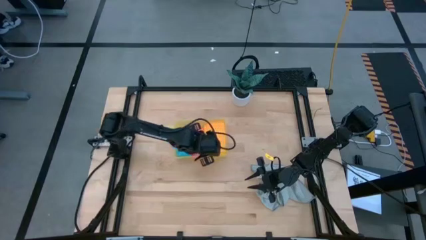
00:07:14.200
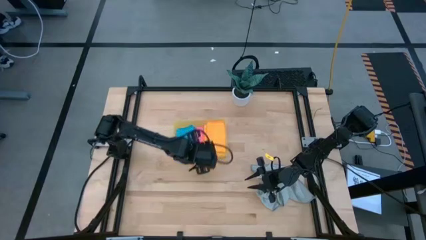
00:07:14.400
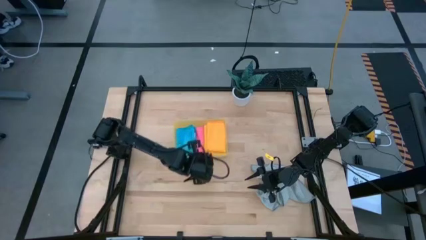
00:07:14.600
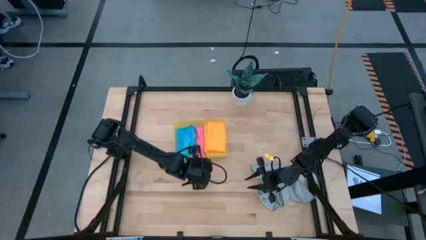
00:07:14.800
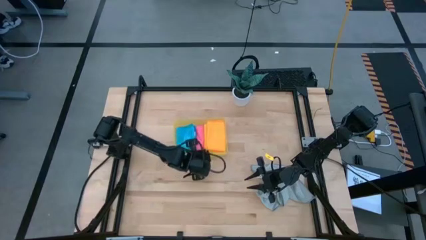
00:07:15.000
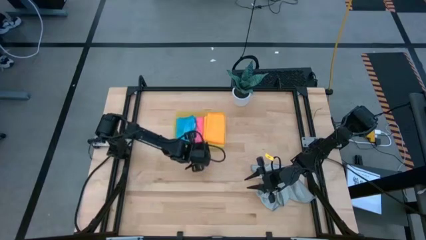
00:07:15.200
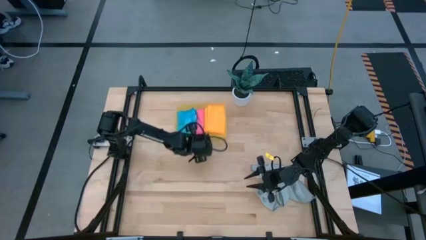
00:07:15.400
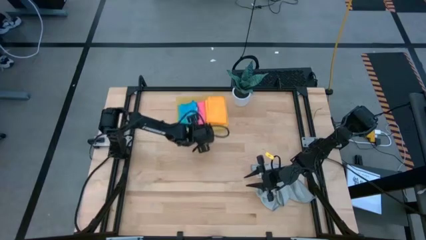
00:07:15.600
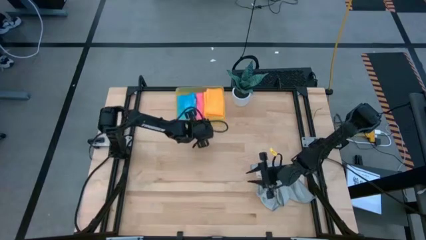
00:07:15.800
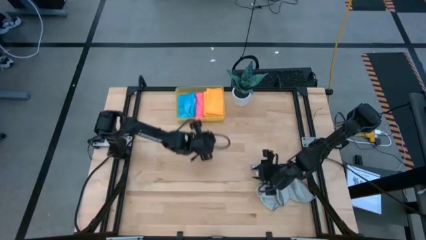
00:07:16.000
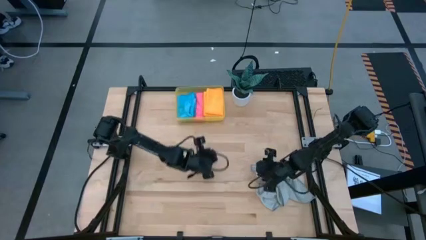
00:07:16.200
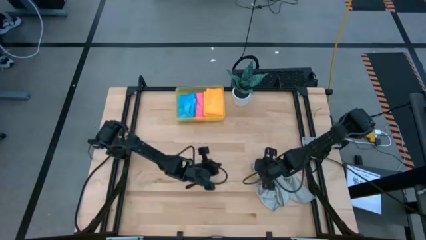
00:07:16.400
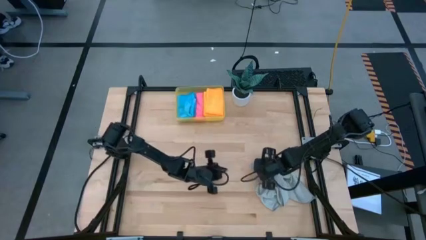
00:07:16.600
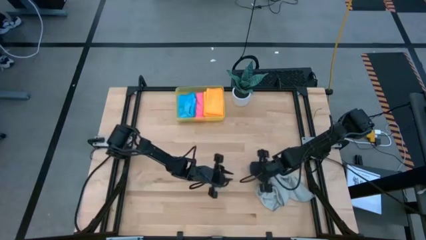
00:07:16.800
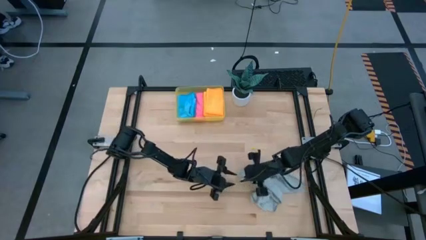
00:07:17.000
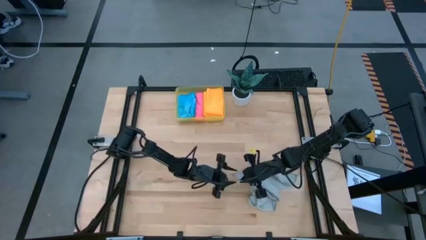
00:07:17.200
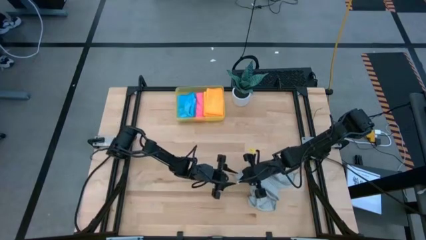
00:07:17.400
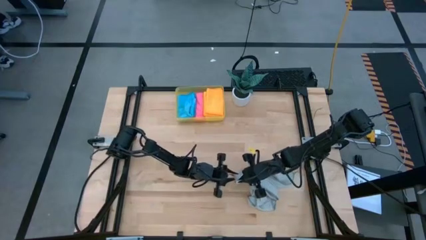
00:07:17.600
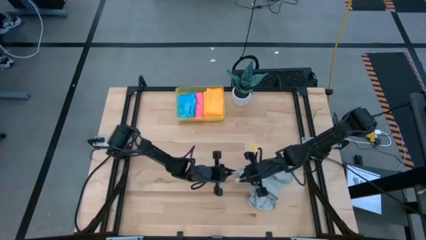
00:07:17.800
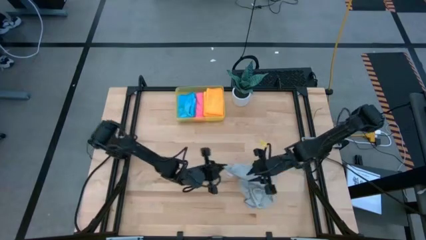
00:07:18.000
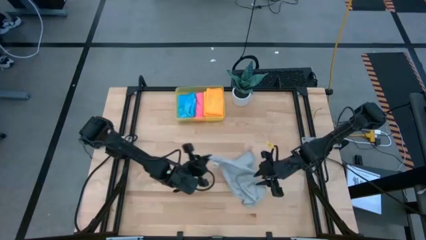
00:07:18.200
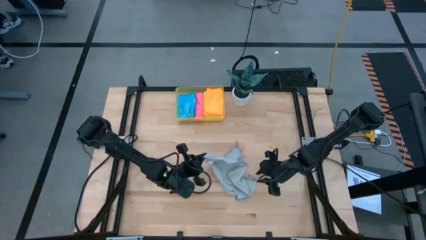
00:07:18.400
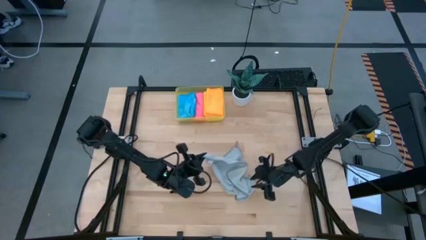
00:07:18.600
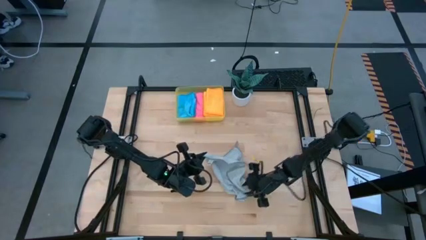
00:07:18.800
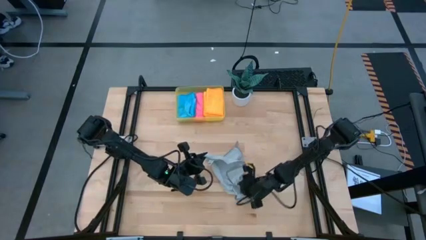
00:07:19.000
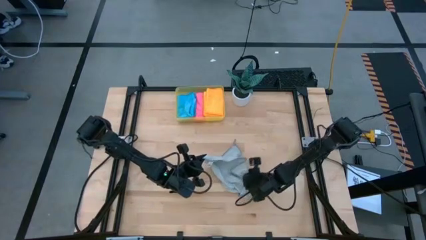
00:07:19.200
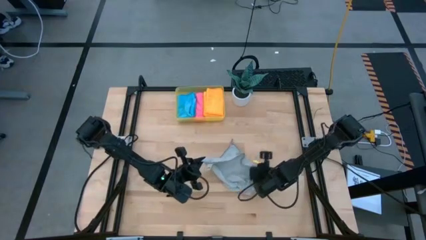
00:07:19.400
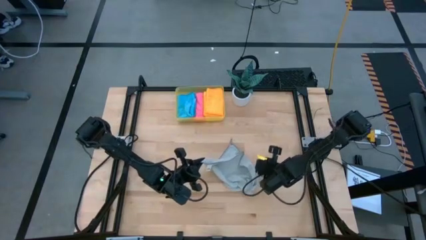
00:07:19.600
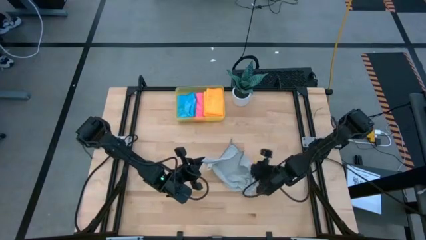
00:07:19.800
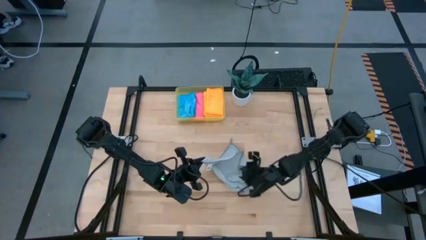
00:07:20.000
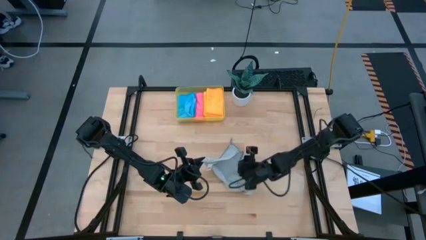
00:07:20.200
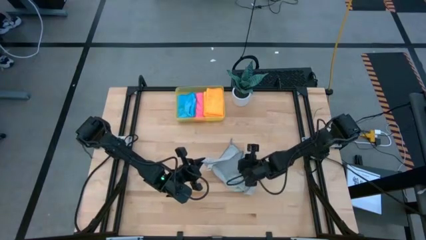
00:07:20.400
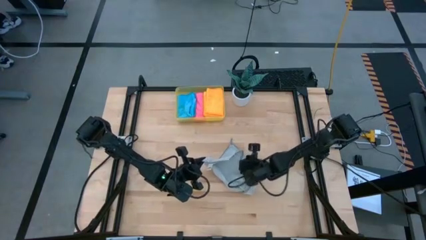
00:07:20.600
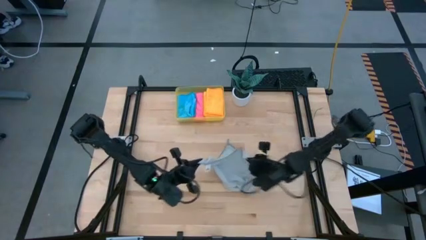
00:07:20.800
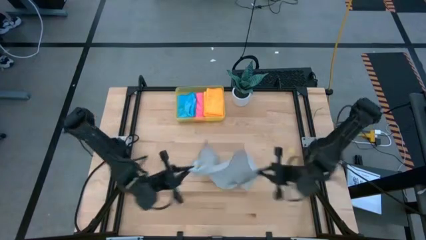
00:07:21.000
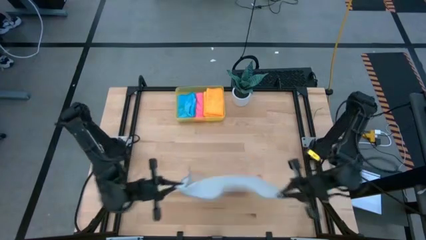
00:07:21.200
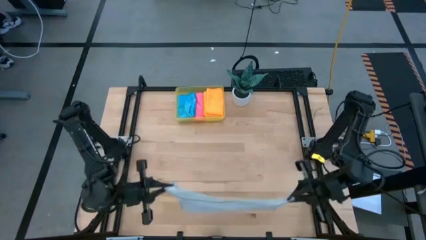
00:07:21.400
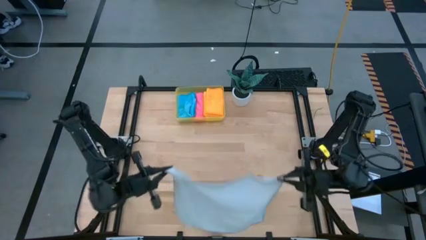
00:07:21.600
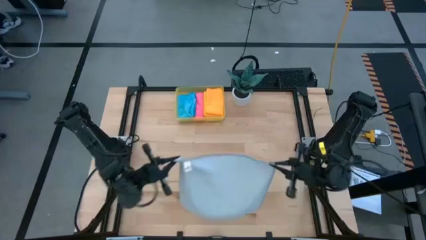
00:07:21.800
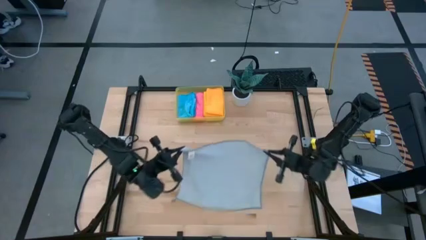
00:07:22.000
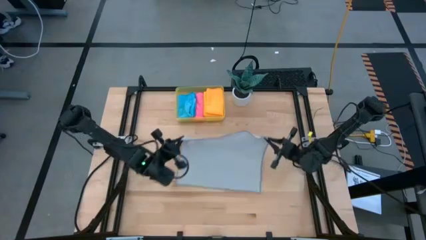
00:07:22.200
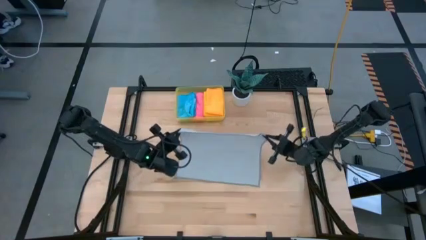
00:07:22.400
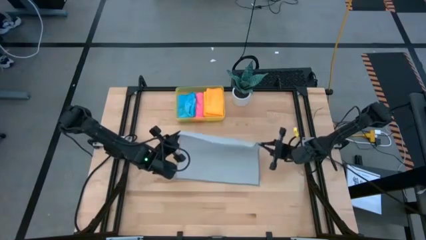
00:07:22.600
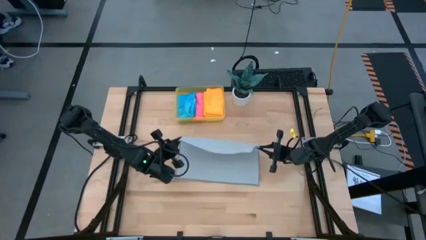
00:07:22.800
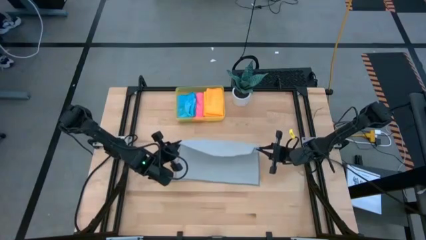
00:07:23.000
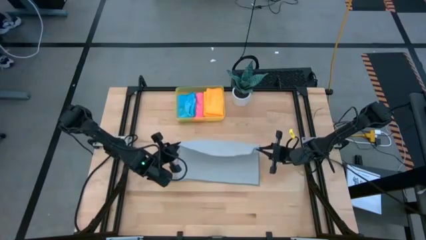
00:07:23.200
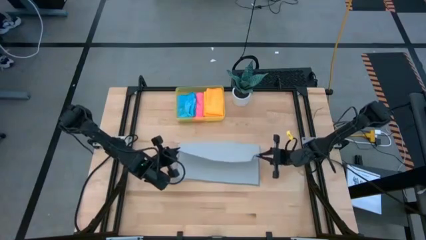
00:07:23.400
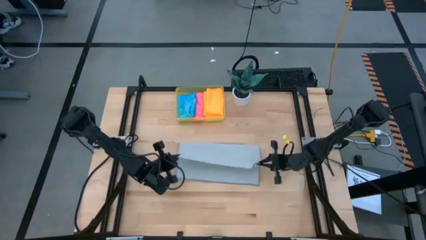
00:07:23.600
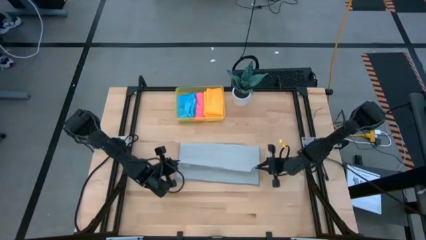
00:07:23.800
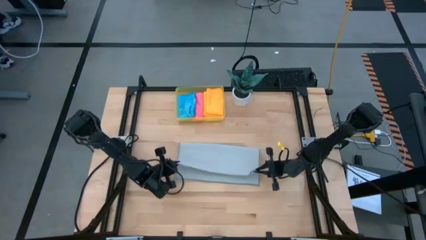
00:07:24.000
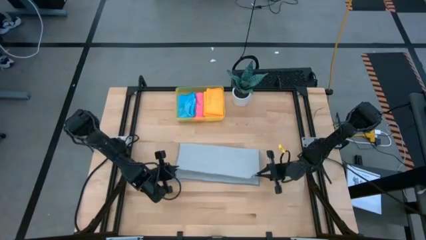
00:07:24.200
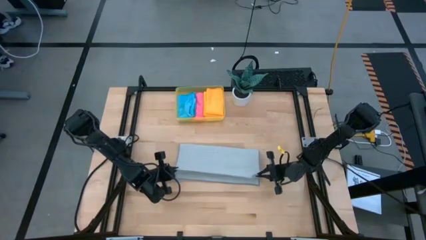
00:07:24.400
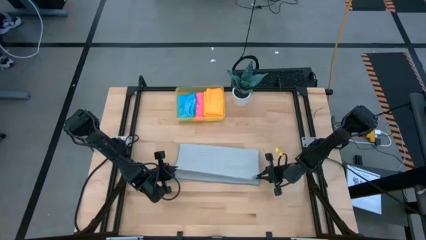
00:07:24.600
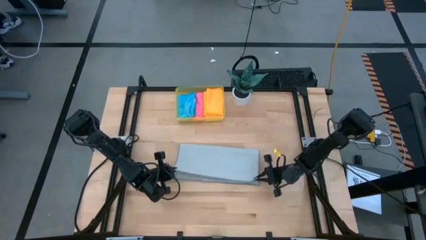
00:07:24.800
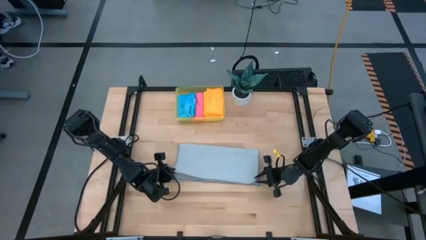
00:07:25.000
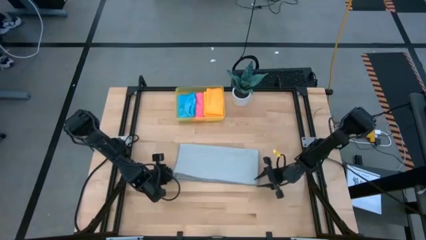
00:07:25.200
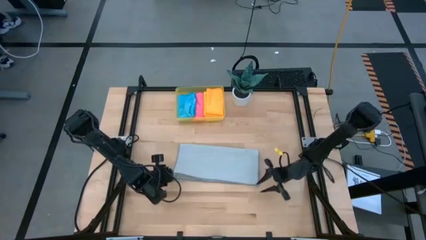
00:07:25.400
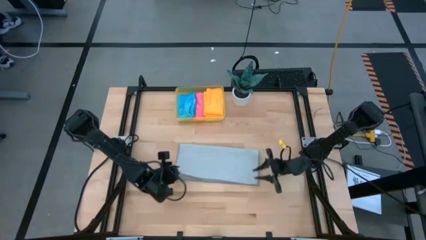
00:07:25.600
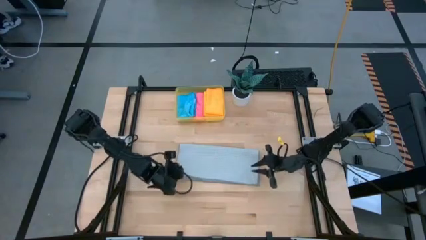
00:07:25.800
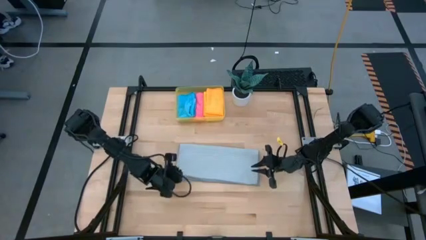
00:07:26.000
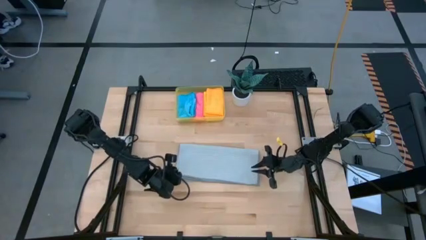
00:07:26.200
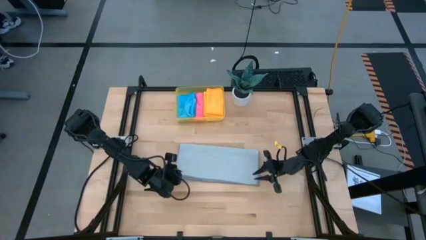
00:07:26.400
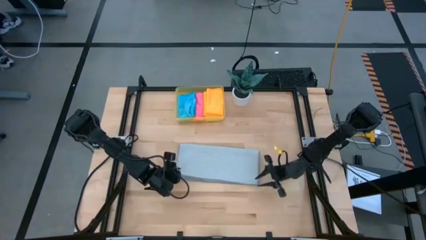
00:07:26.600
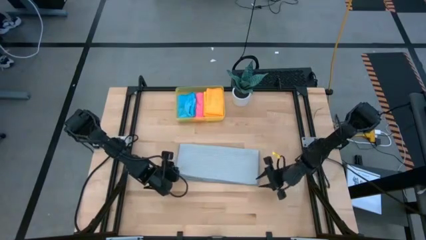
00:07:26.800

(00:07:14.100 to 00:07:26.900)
Task: Fold microfiber towels
Fold the gray microfiber cloth

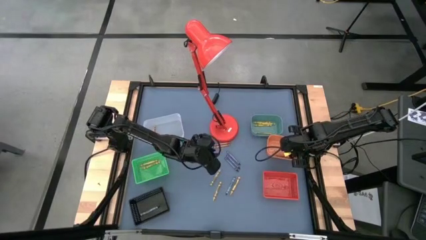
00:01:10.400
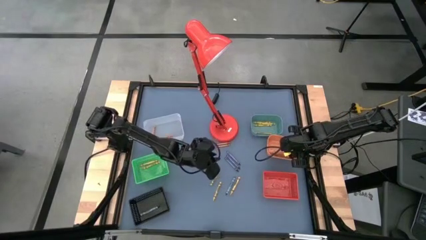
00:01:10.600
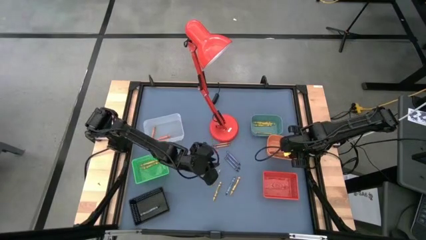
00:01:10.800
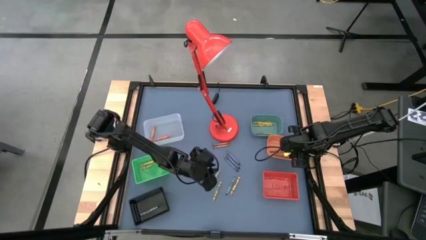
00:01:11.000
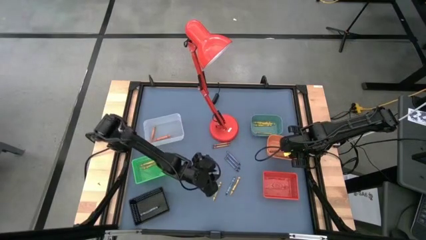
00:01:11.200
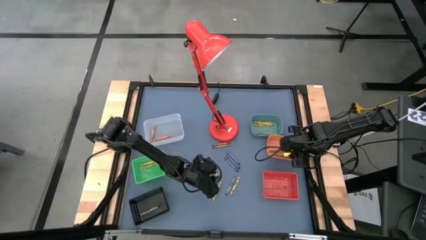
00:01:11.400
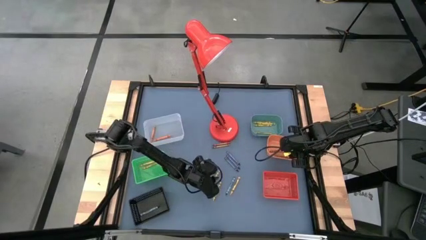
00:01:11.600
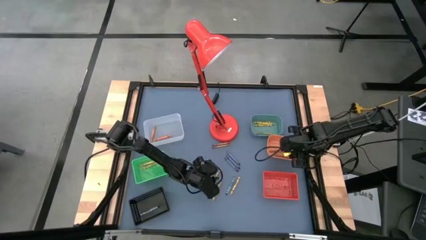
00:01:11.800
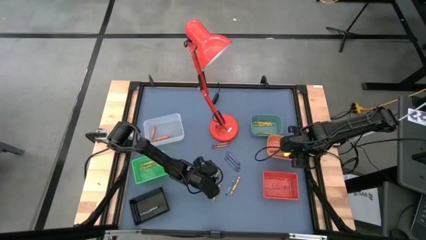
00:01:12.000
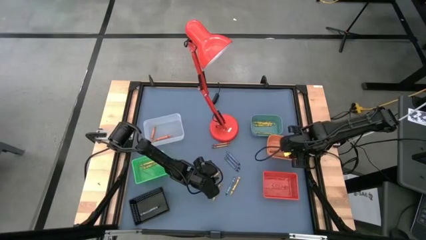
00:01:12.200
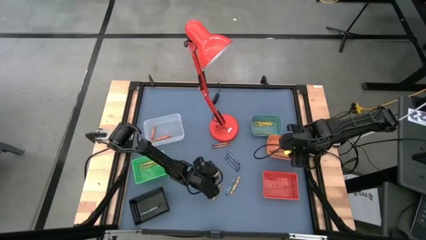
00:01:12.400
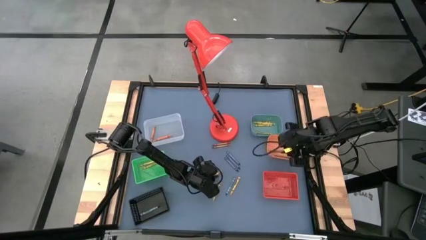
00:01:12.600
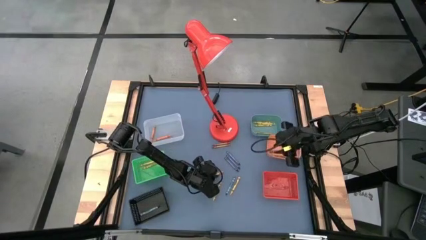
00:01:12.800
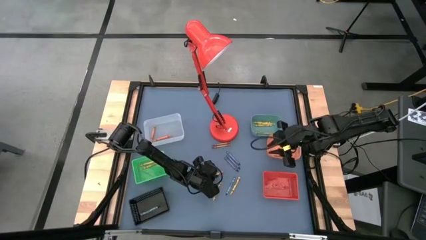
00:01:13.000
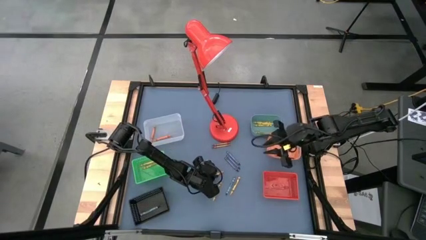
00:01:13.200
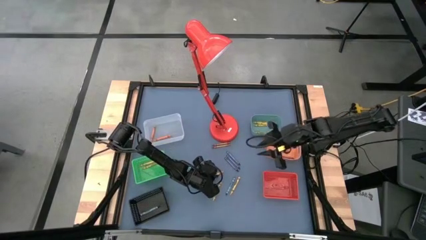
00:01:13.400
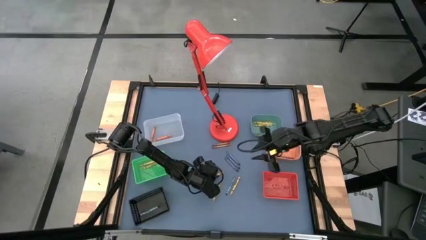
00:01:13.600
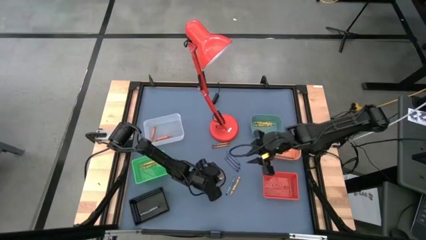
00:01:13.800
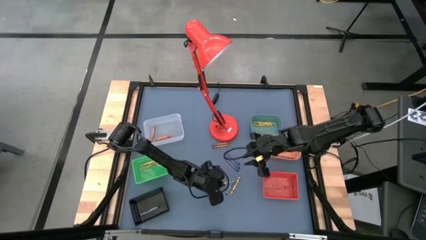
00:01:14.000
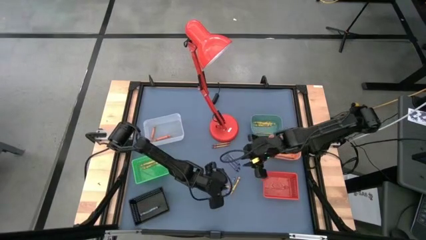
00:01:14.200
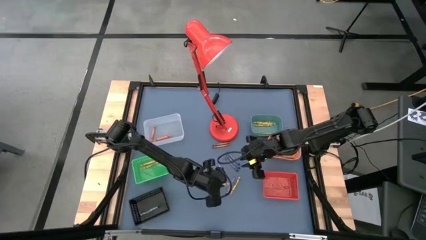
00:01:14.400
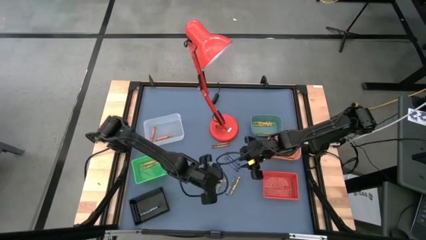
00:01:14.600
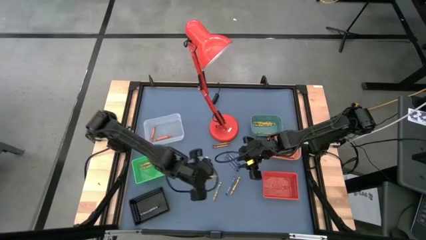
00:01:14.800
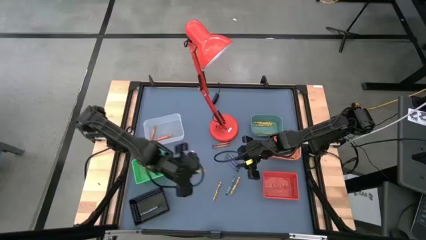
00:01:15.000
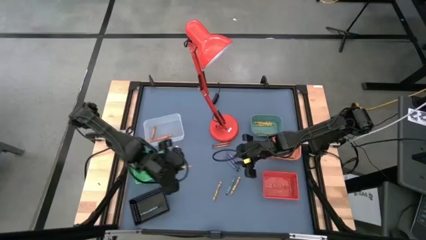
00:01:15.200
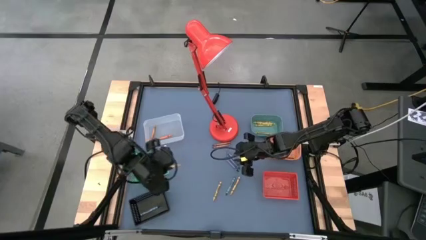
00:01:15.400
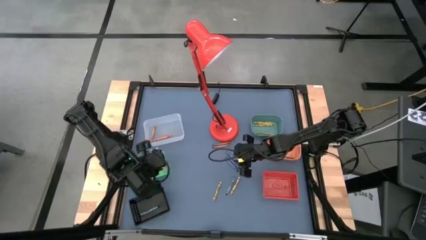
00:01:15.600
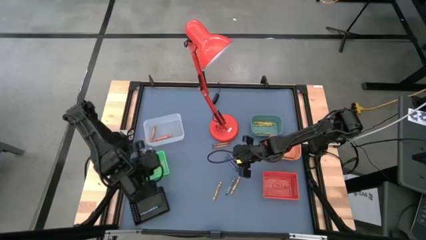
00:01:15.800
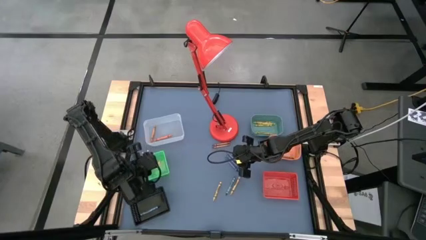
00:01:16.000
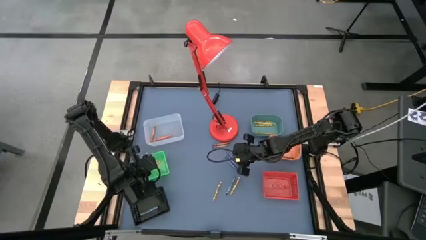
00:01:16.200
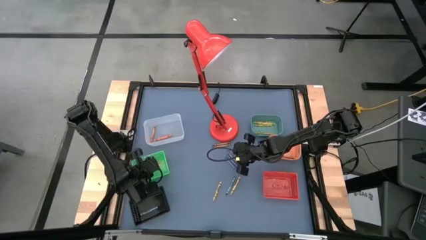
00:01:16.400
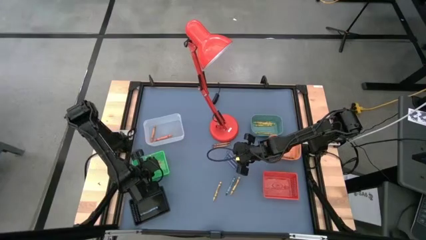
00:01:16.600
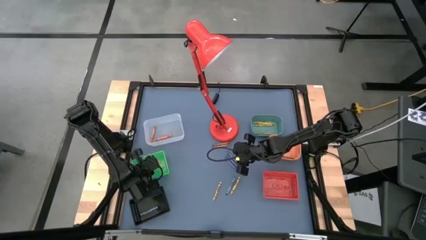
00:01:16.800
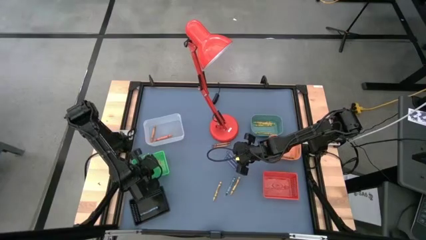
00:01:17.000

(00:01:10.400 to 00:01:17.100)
Task: Sort crayons
Put the golden crayon into the green bin
